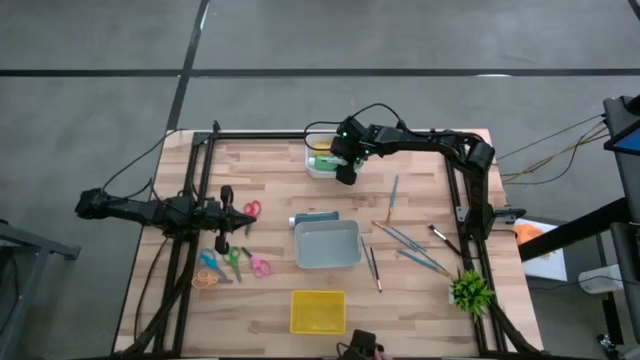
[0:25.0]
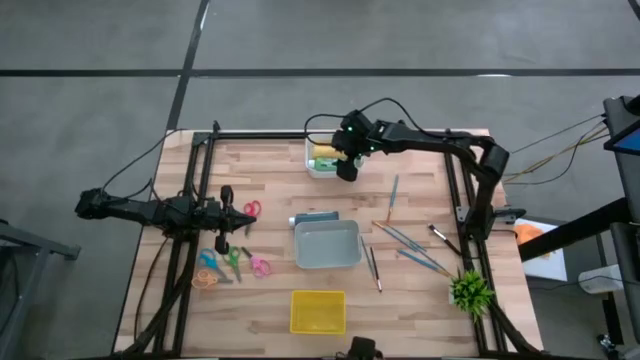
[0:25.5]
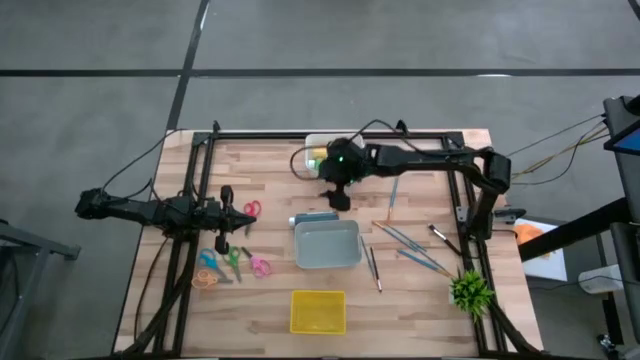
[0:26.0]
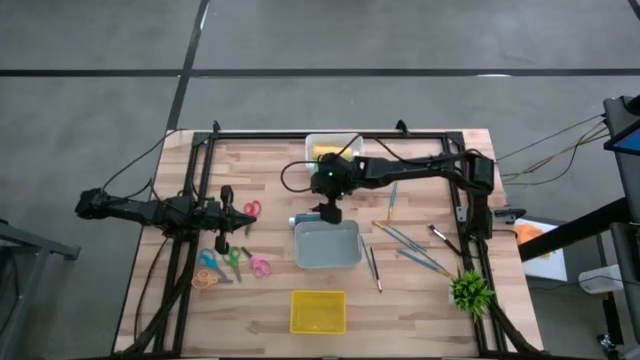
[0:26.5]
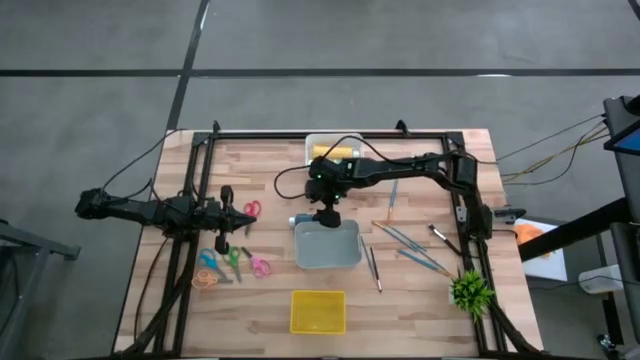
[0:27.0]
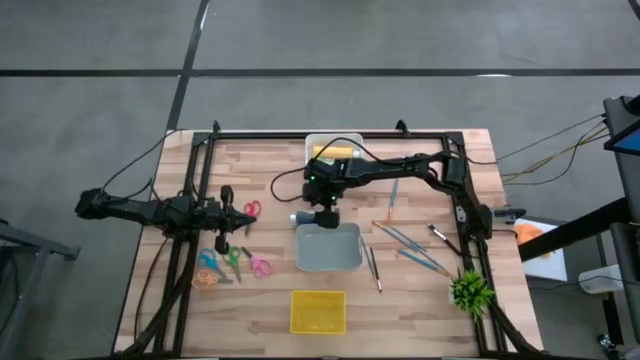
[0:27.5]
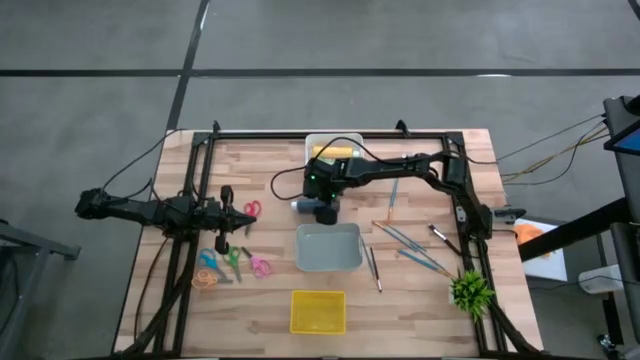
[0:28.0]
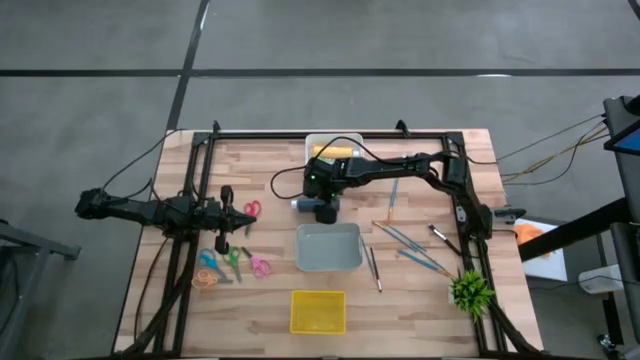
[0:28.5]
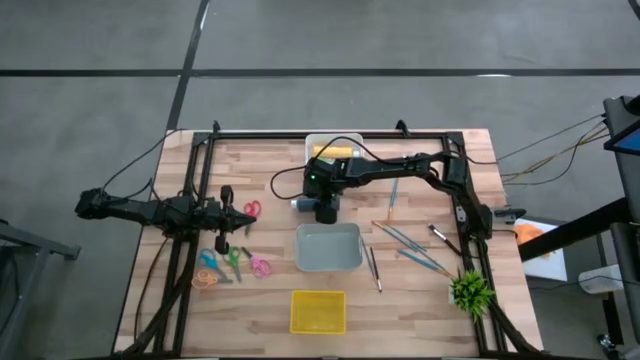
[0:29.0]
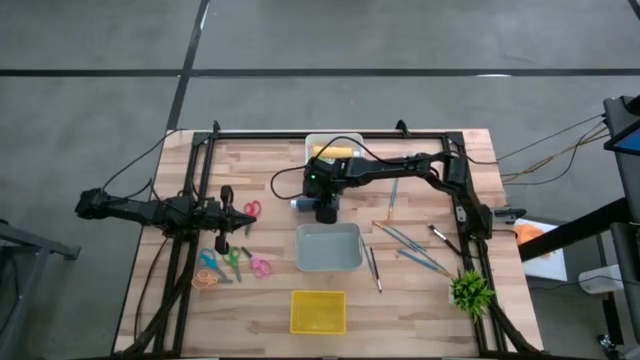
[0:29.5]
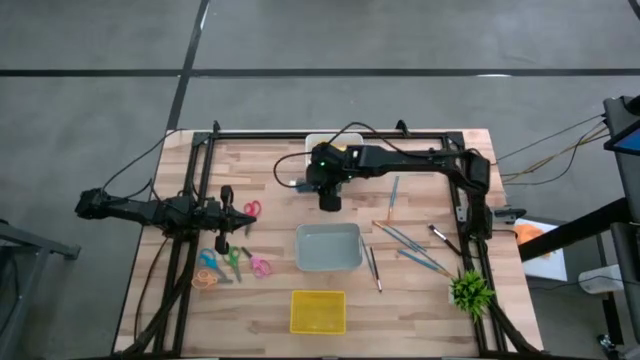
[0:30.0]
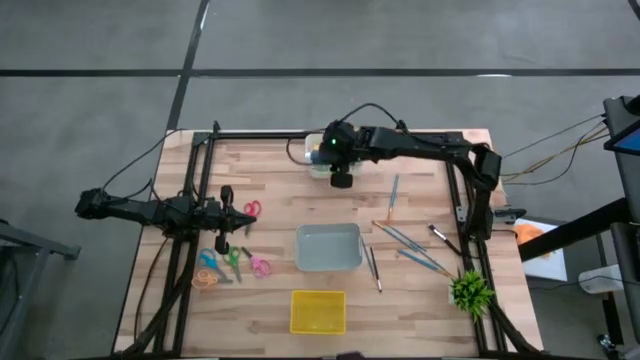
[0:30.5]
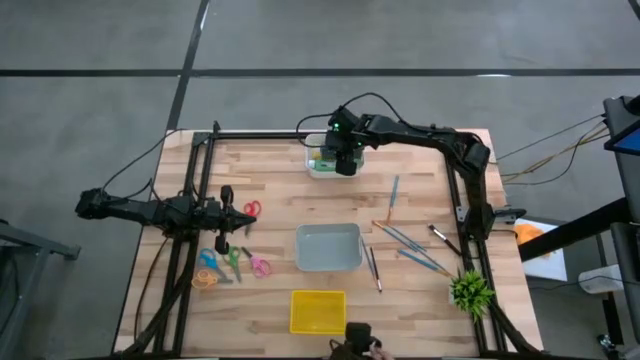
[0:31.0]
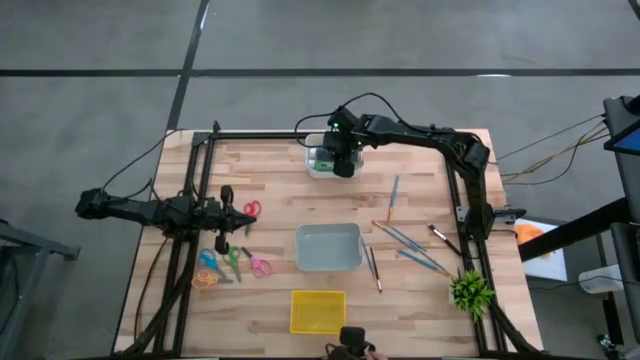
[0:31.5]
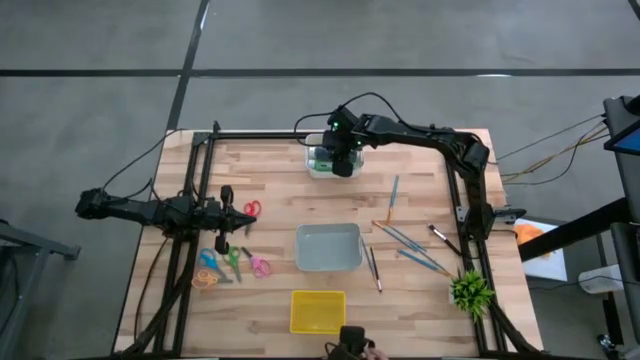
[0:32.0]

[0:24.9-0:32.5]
Task: Pick & Place Paint Supplies
Put the black paint bottle into the white bin

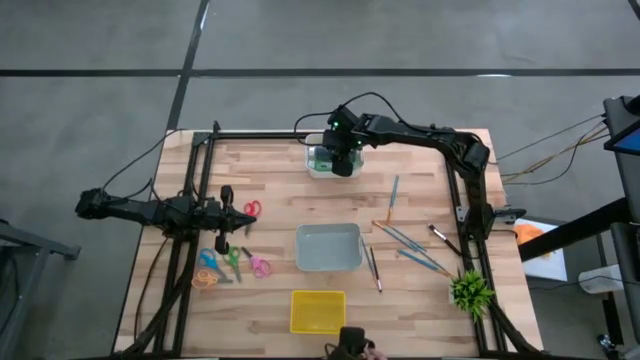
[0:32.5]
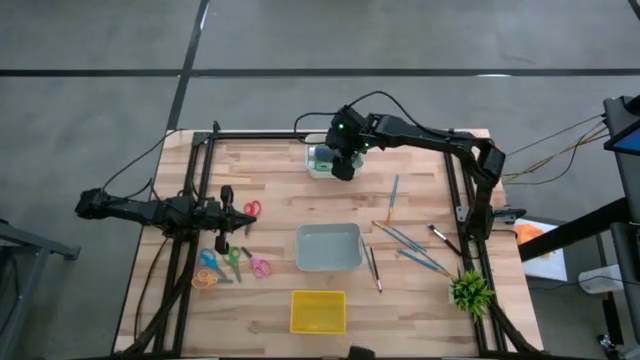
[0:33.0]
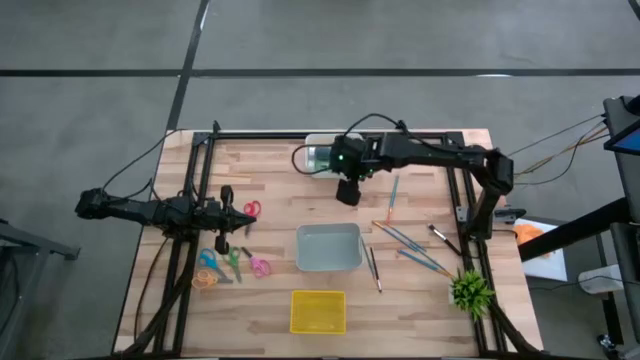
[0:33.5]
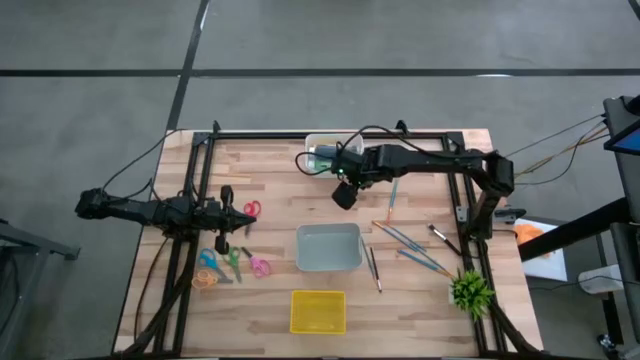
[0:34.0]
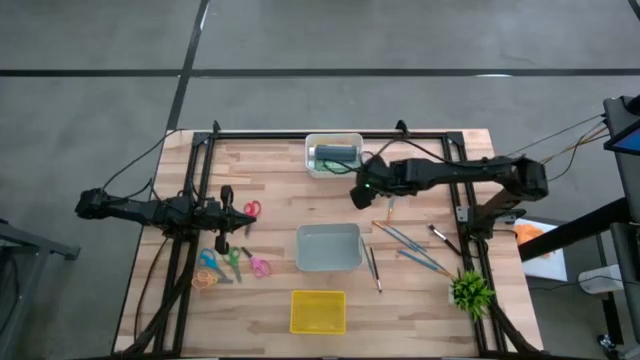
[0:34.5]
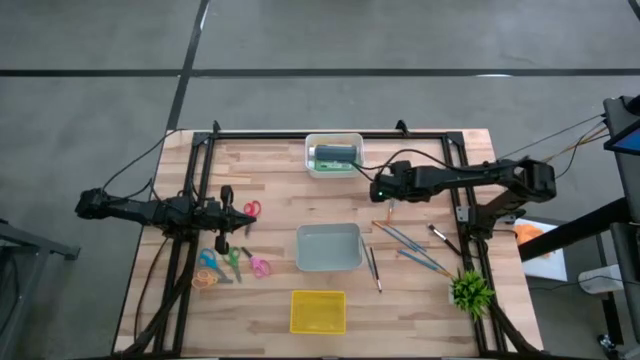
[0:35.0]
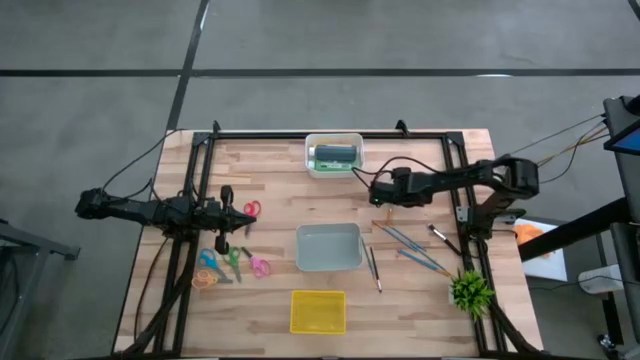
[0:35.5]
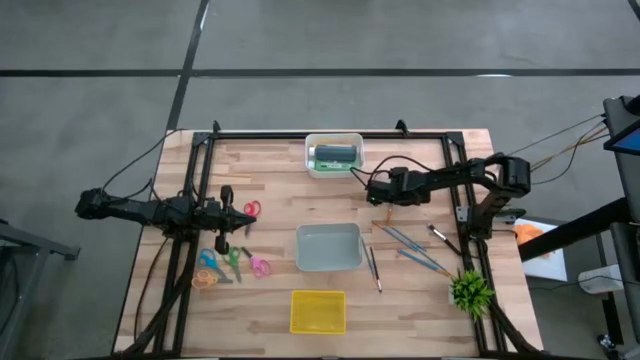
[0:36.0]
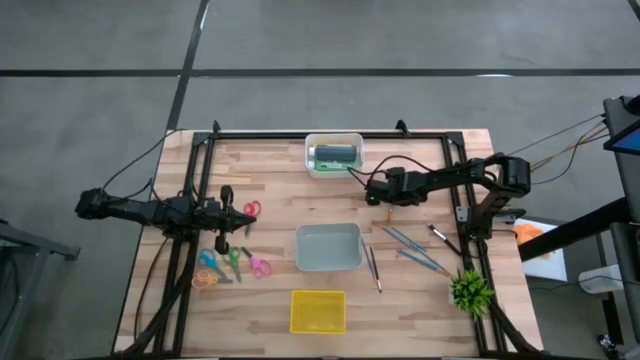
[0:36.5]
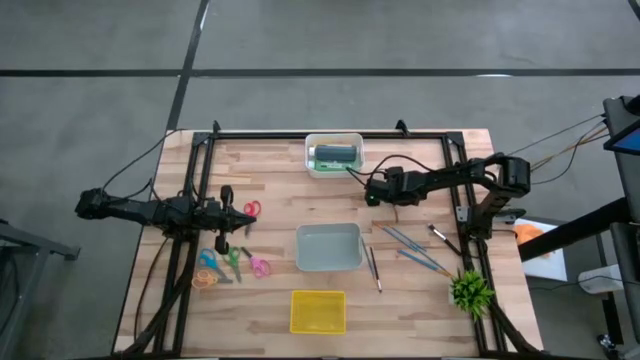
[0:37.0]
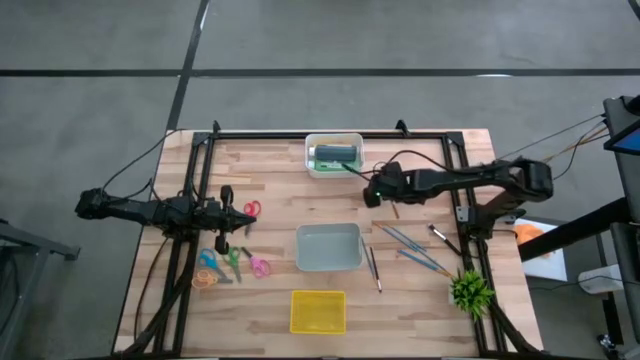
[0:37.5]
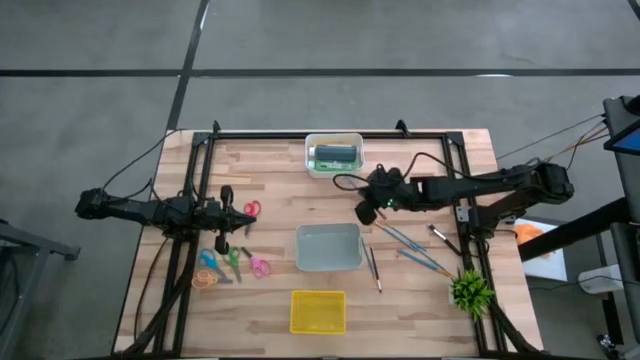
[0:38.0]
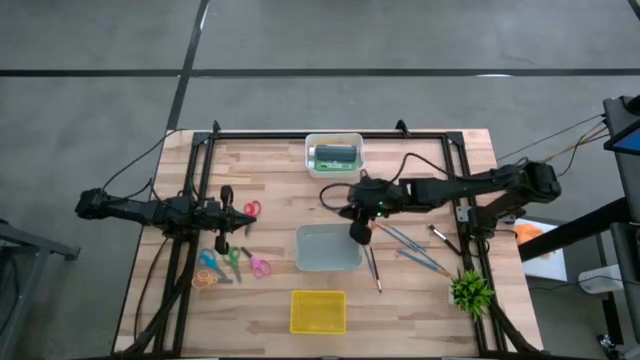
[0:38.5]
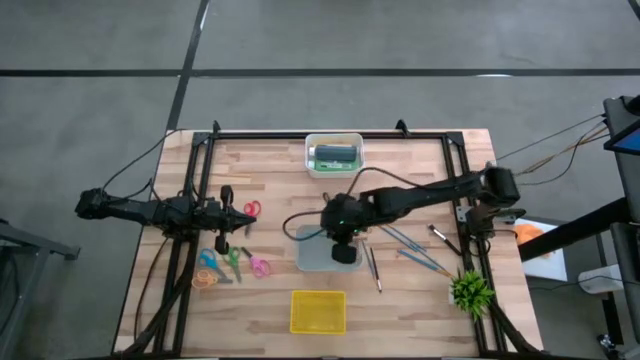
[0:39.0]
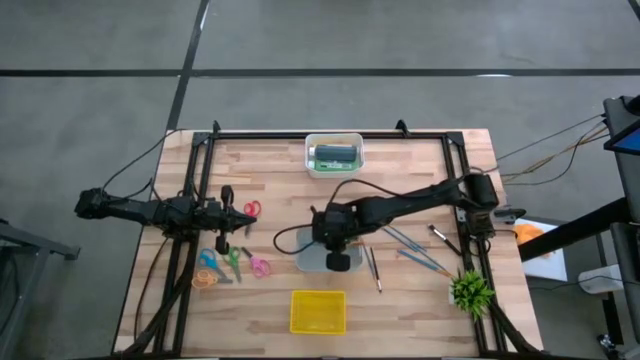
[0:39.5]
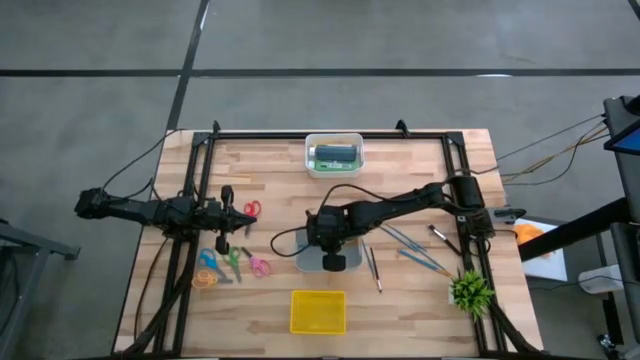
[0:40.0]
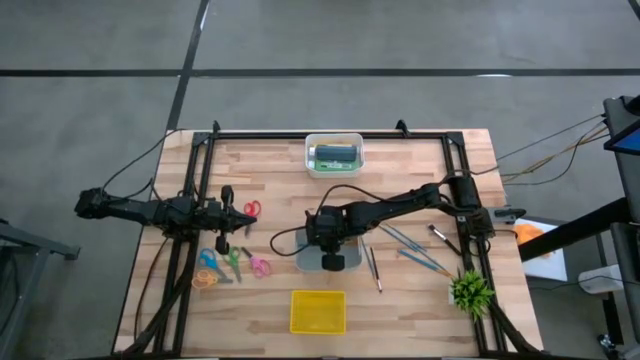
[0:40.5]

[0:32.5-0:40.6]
Put the blue paint brush into the gray bin

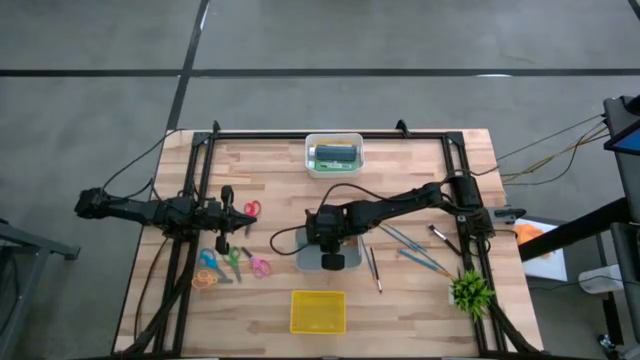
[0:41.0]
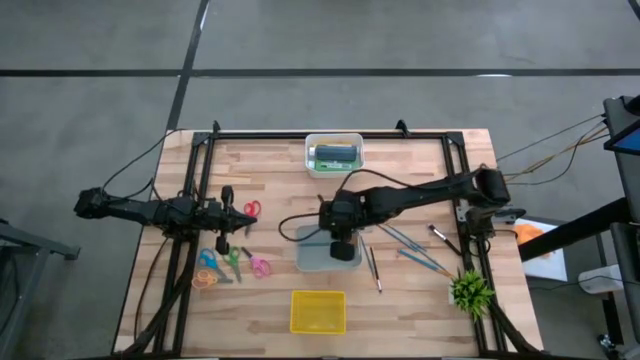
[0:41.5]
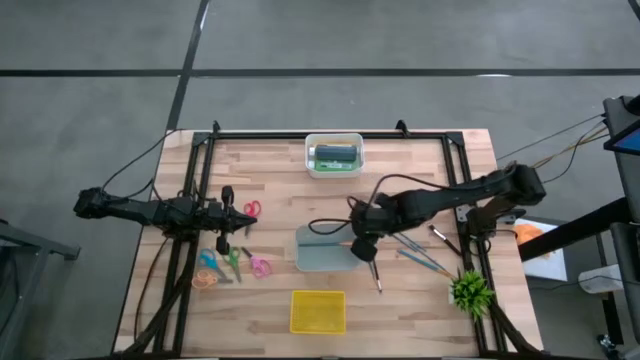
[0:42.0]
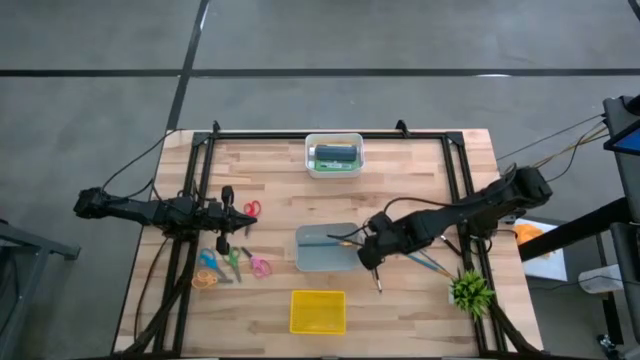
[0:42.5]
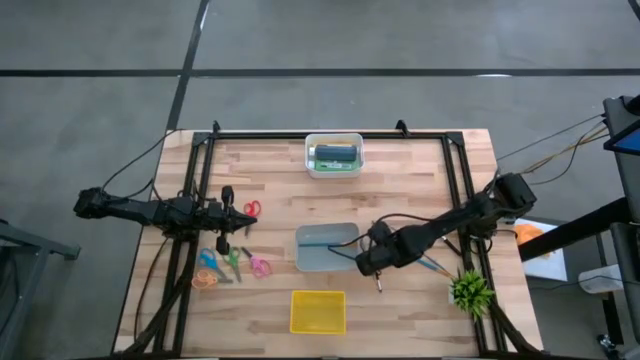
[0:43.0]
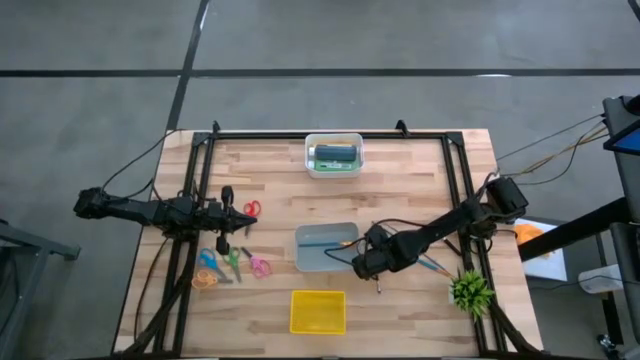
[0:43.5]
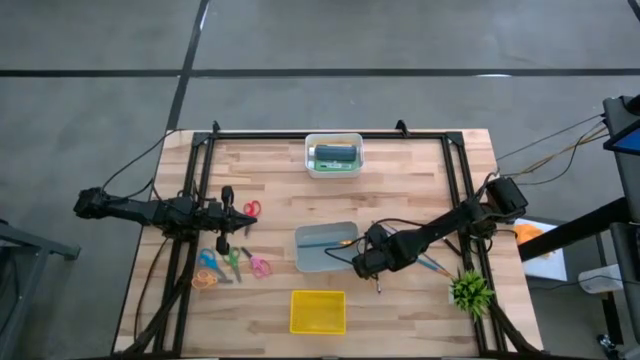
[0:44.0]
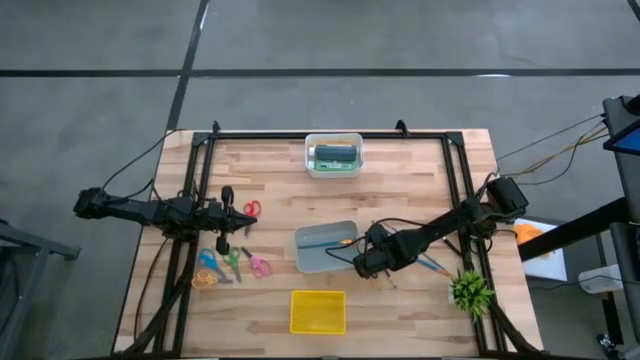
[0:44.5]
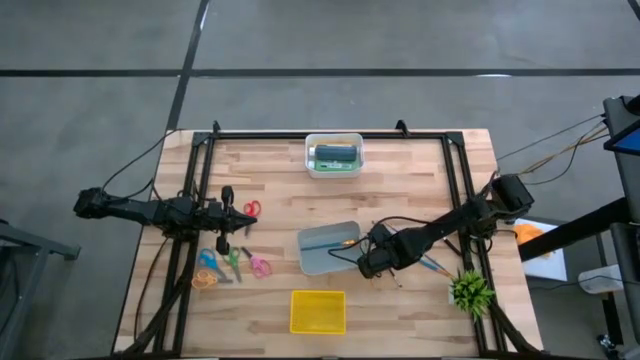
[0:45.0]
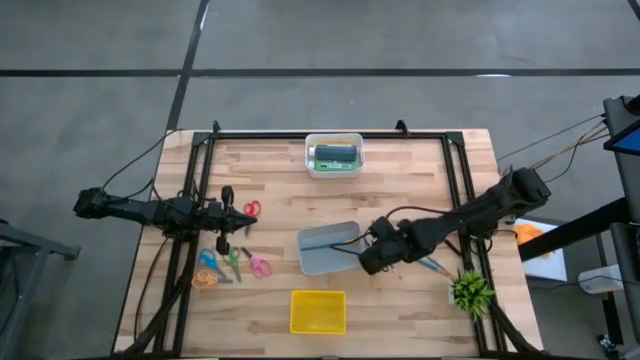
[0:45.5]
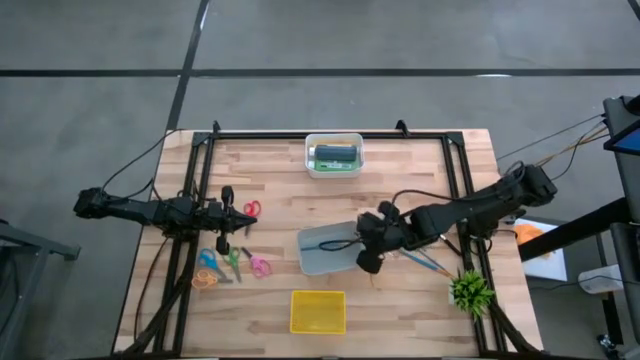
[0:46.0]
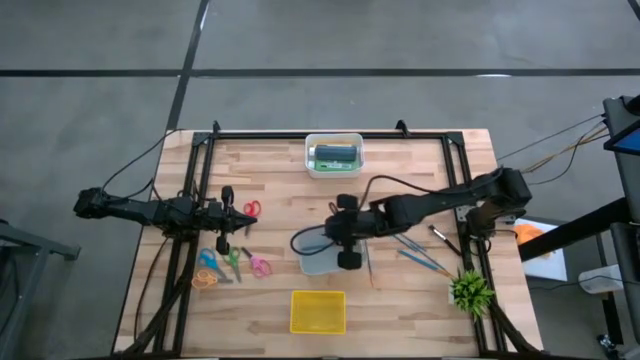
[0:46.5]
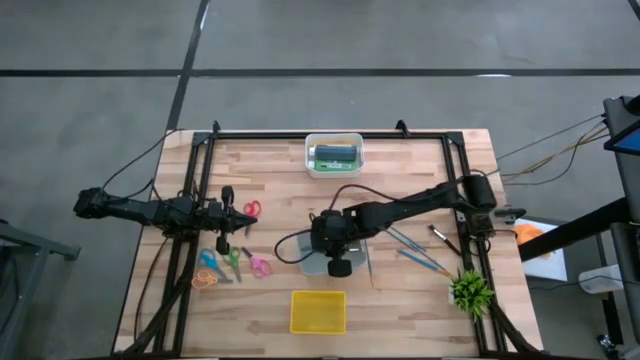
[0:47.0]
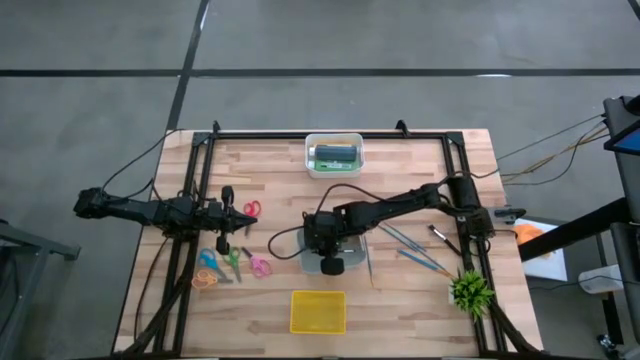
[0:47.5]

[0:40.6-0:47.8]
Put the black paint brush into the gray bin
